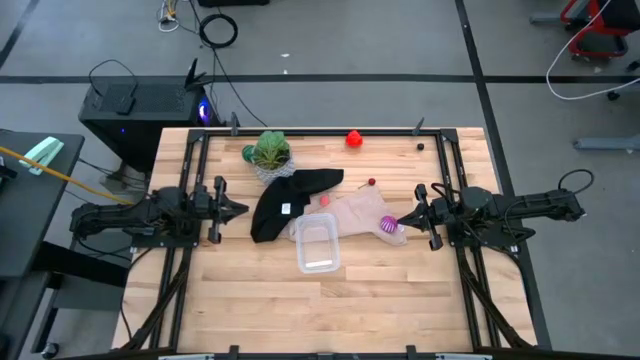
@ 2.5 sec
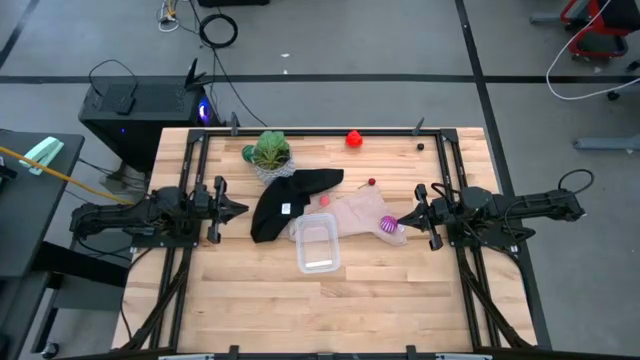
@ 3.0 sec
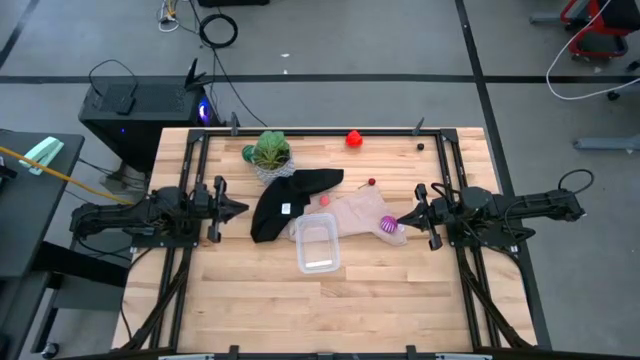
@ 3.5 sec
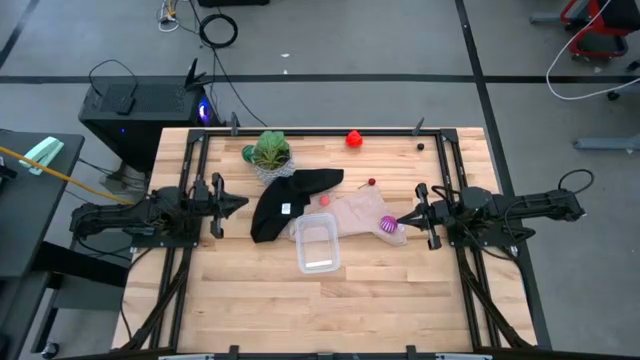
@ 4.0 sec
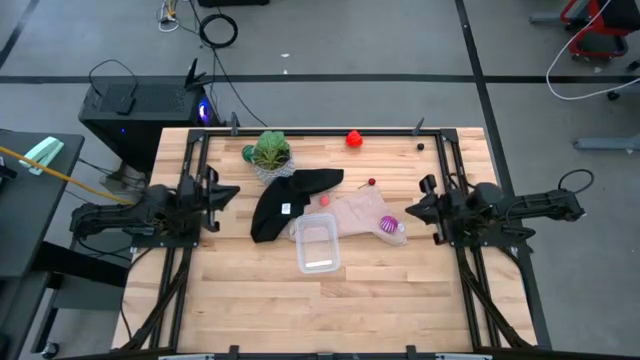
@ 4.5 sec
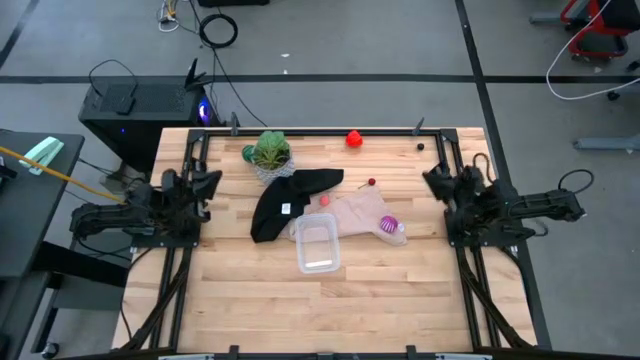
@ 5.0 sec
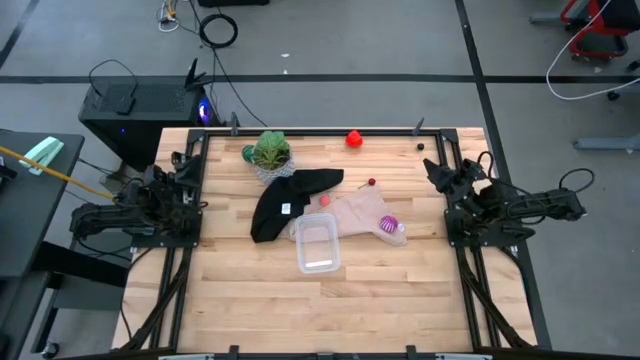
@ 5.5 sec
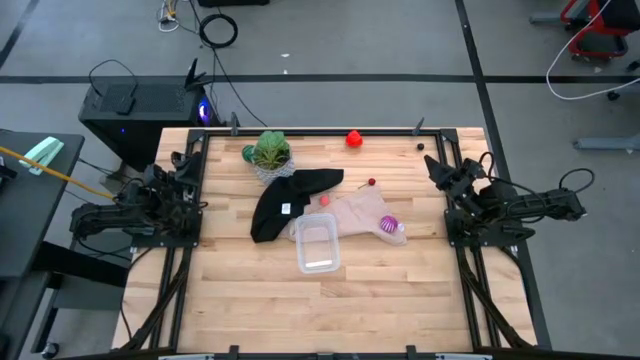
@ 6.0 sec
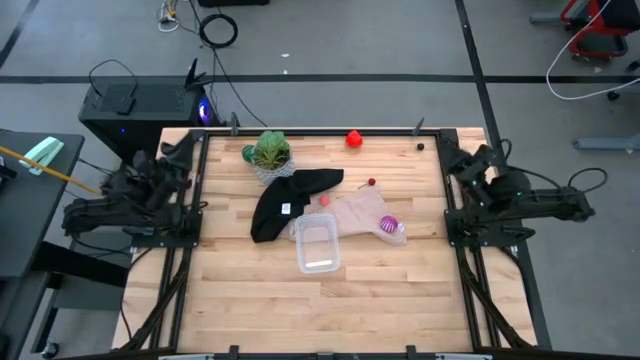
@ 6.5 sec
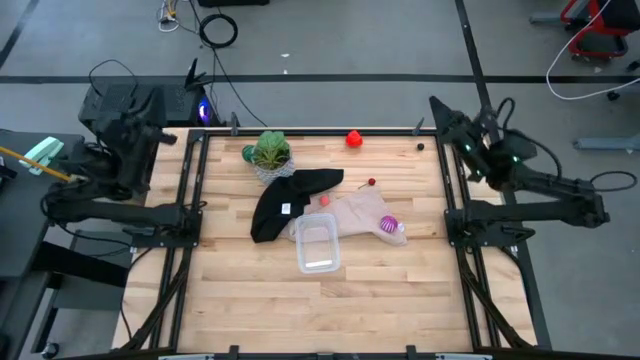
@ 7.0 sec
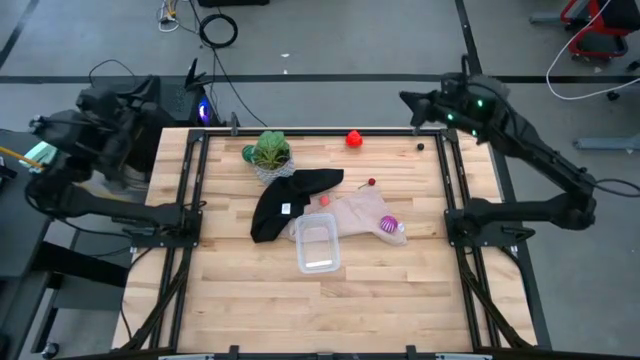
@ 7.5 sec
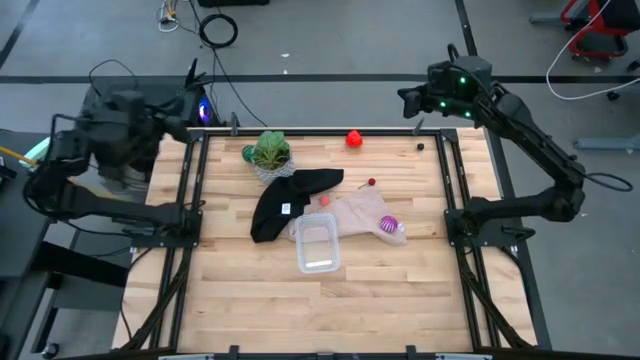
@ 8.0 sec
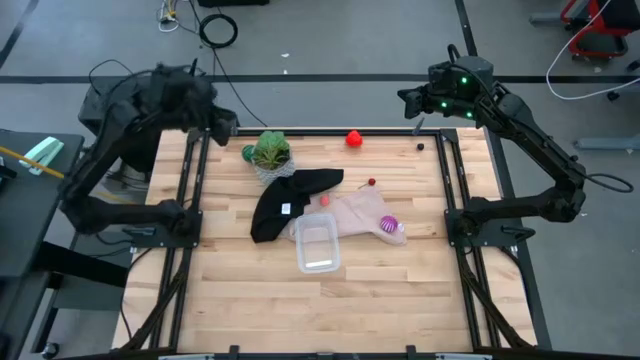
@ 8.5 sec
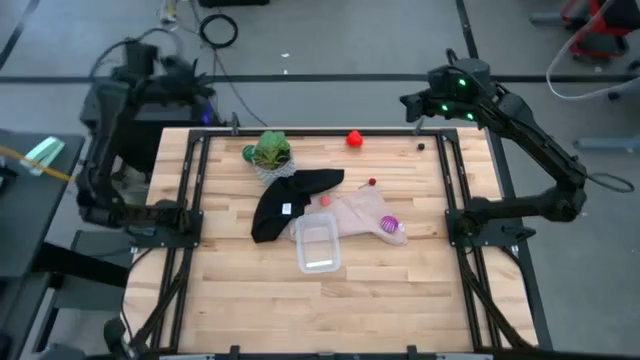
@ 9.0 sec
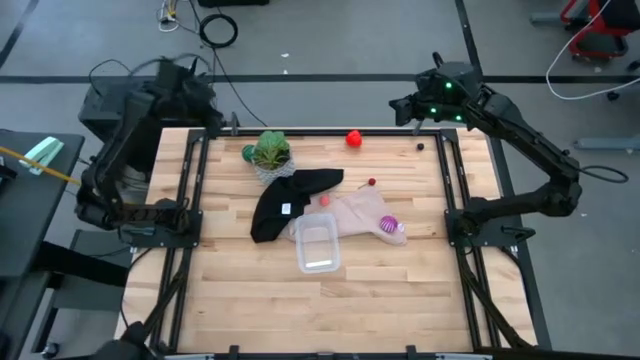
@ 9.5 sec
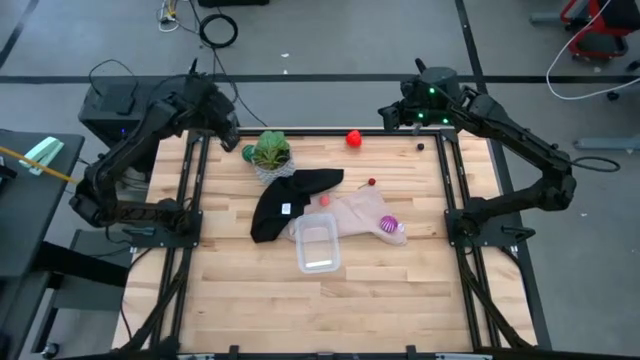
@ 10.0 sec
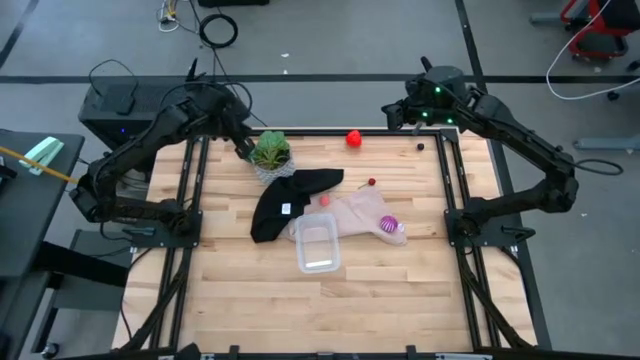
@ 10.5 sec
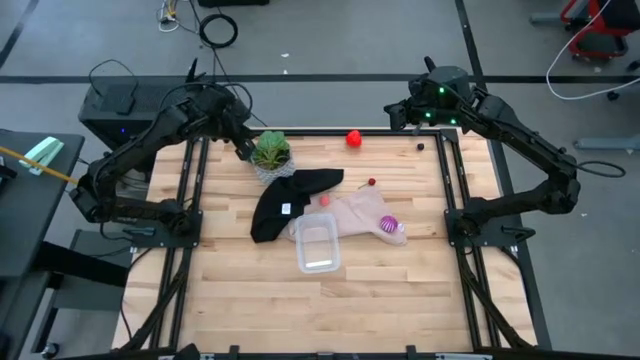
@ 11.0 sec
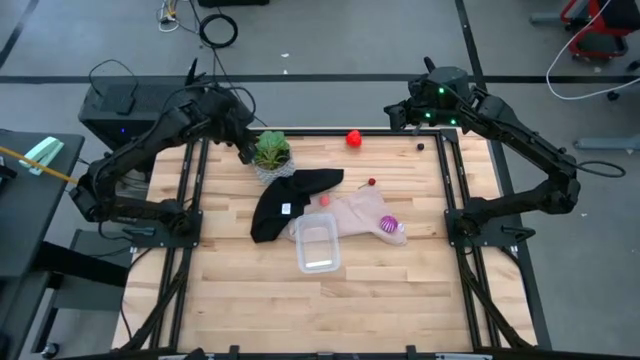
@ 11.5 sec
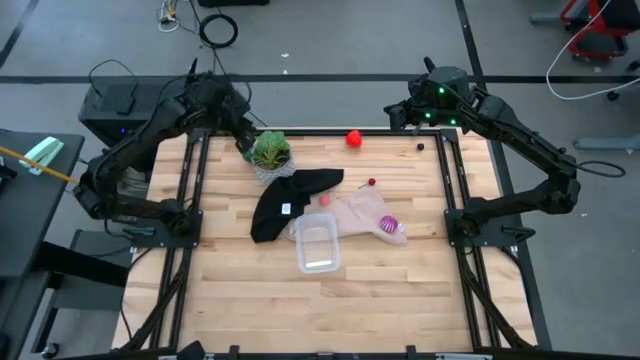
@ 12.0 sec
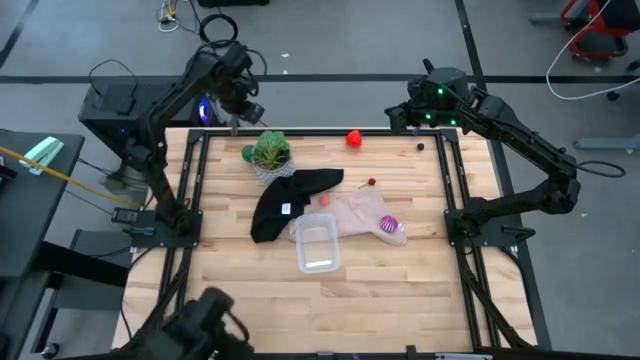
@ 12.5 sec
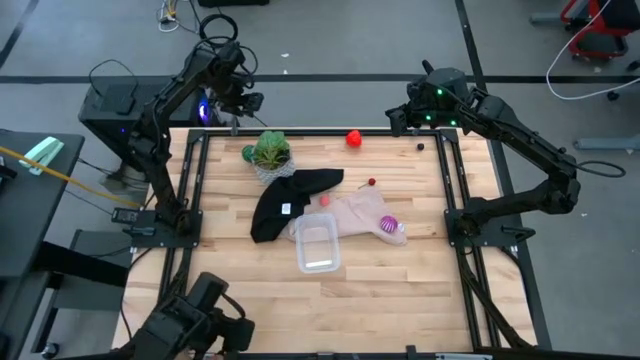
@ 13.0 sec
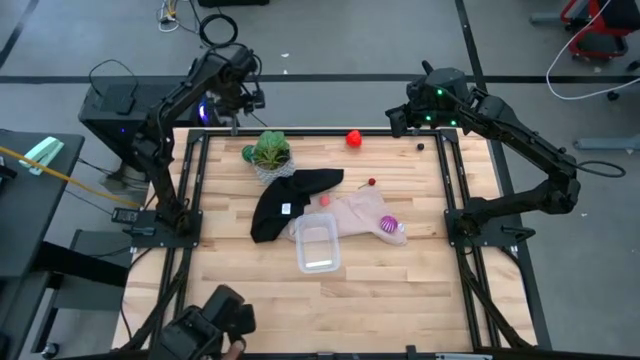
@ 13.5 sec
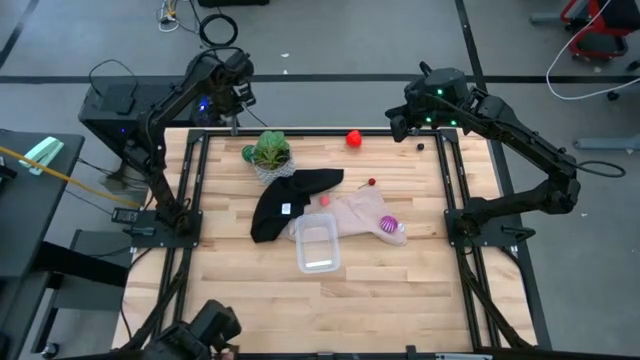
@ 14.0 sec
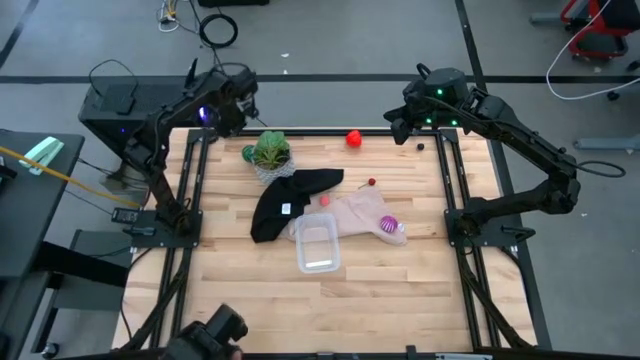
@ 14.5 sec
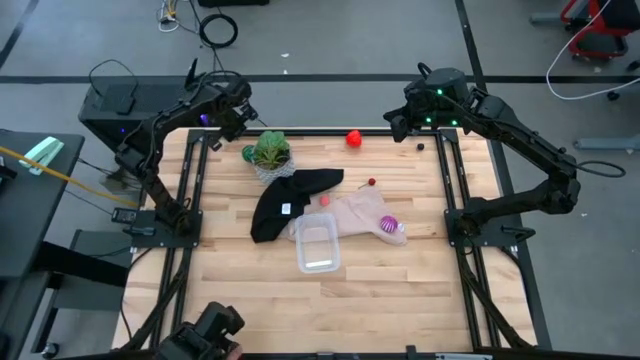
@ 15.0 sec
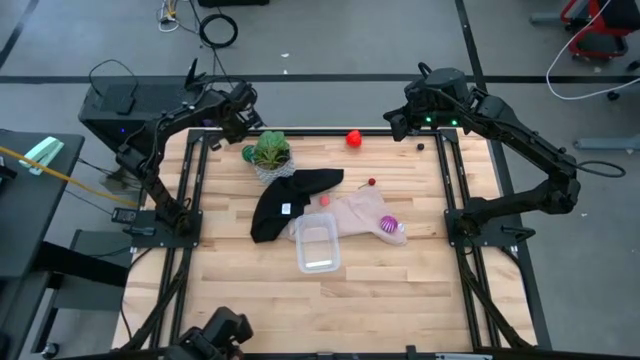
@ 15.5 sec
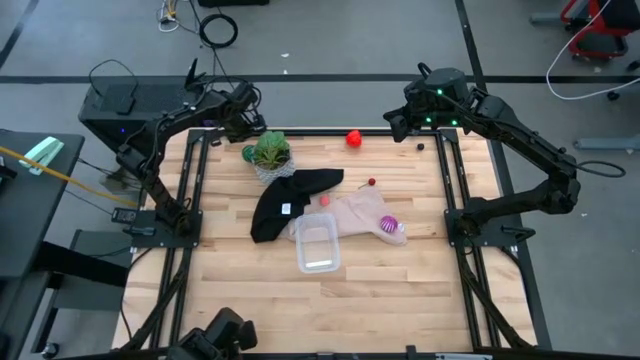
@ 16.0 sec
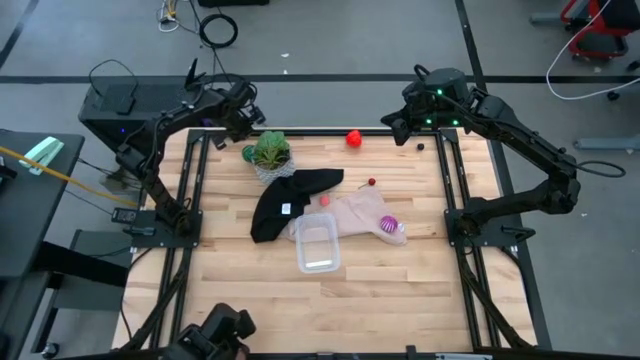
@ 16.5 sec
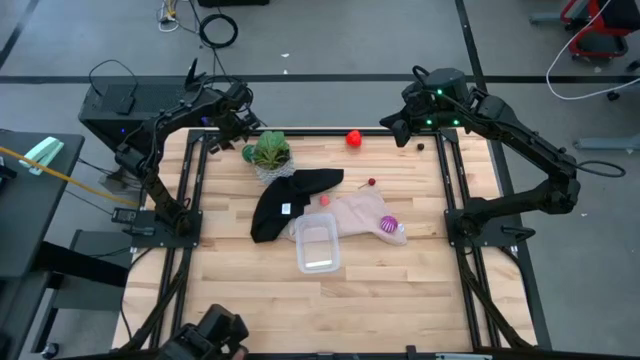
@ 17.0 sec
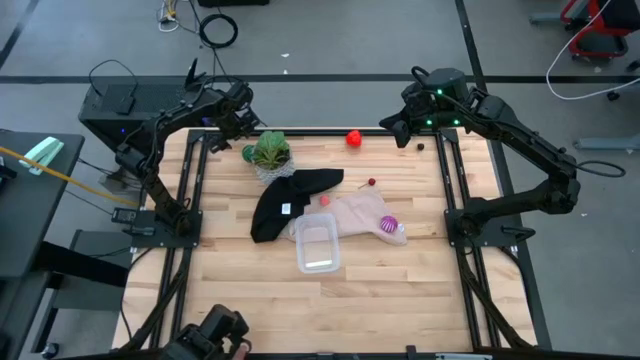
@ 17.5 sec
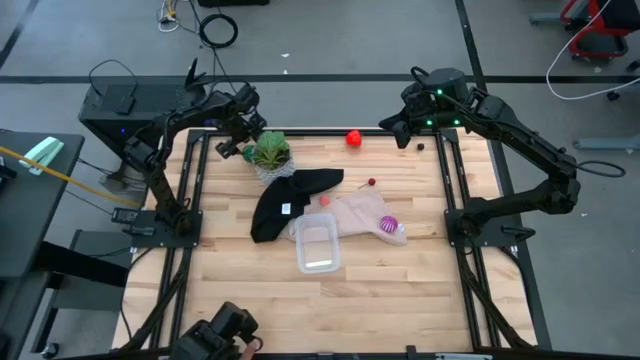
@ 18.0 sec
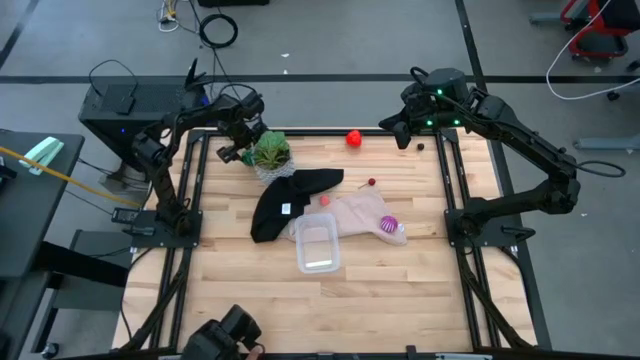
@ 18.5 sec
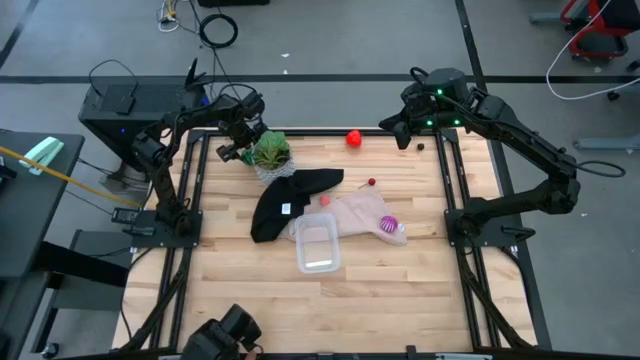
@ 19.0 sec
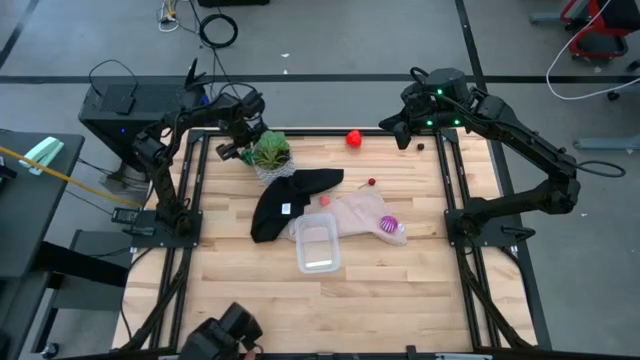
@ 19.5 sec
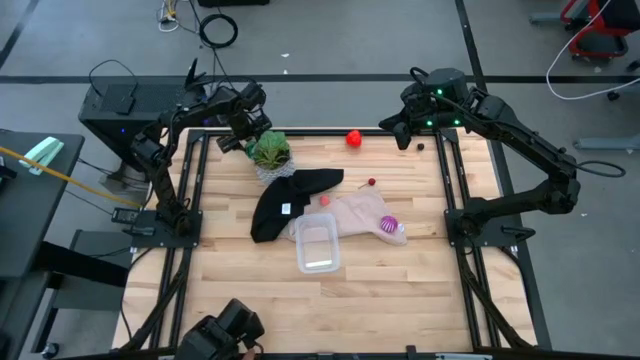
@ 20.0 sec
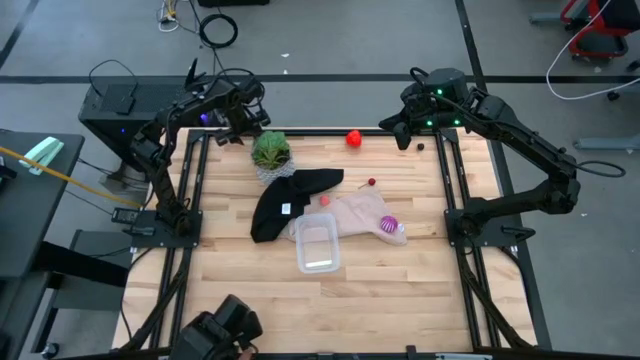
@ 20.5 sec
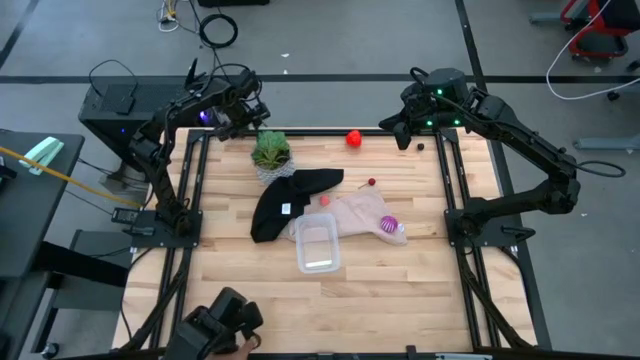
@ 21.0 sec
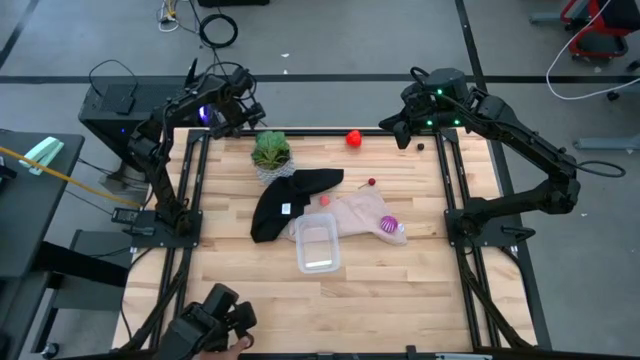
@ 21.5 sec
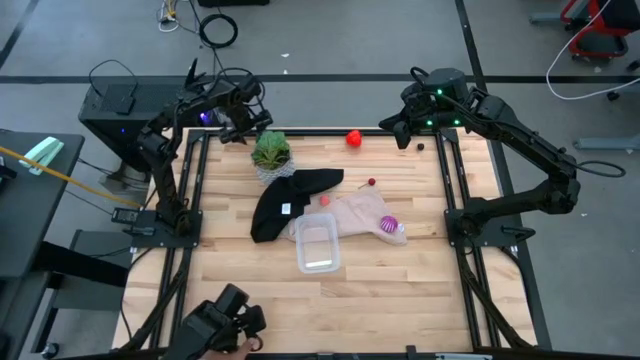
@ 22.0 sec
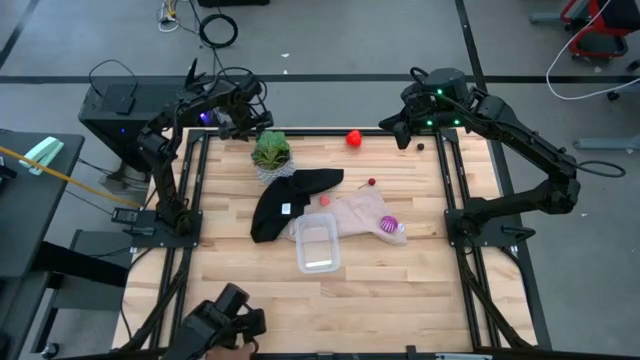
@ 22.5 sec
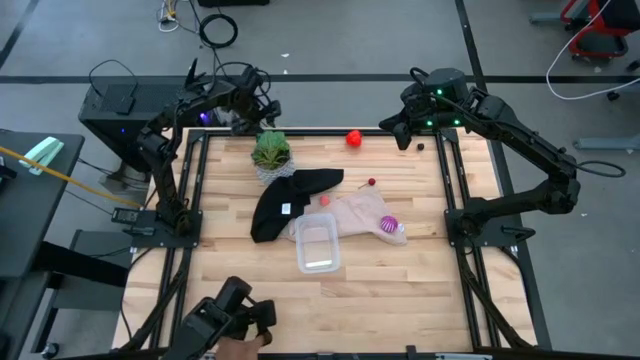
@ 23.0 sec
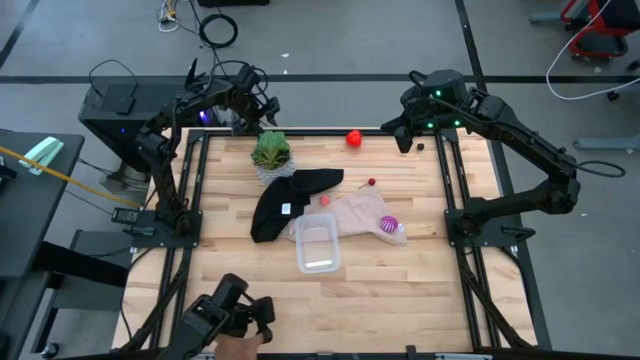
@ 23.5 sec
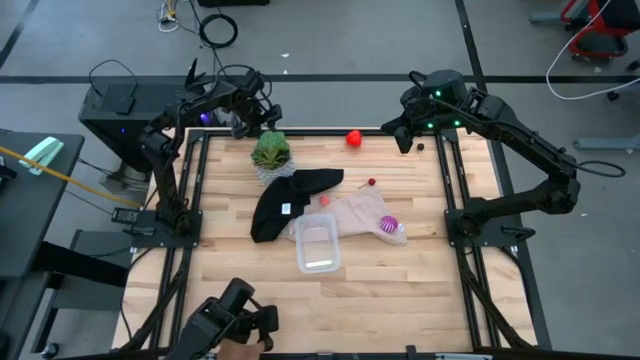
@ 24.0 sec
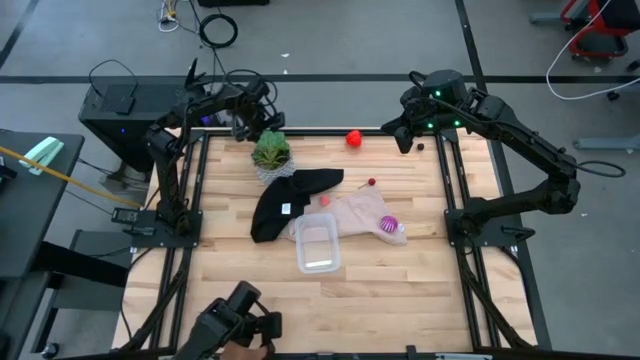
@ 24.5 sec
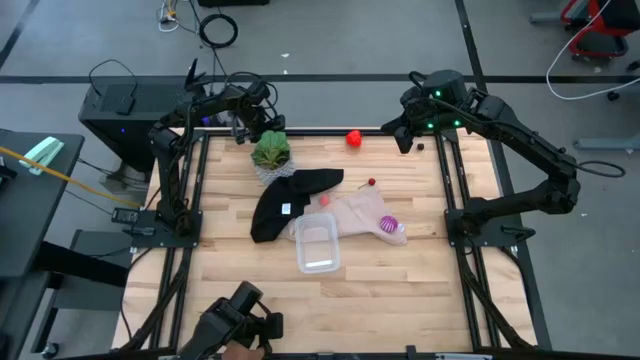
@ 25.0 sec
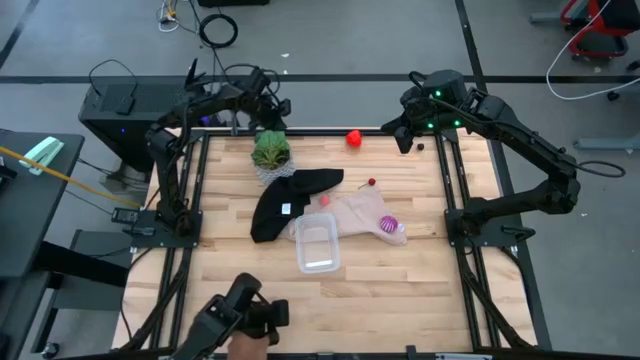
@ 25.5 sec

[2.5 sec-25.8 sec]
Task: Pick and placing Produce into tupperware
Put the watermelon into the transparent container
